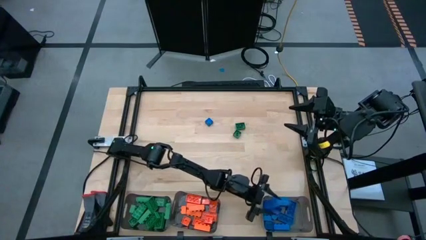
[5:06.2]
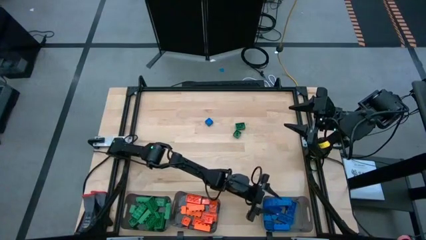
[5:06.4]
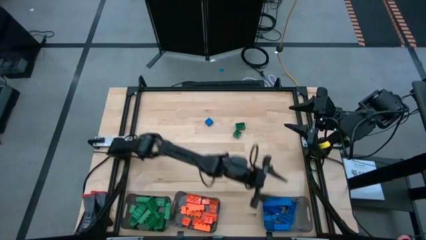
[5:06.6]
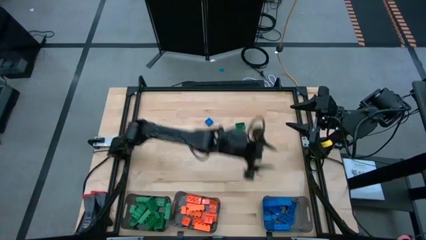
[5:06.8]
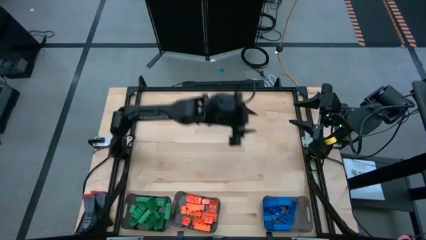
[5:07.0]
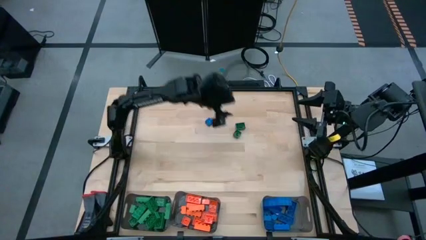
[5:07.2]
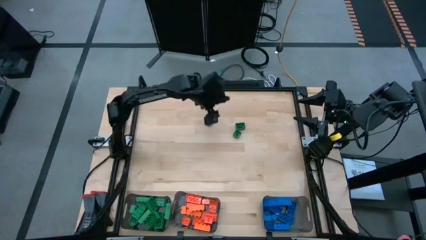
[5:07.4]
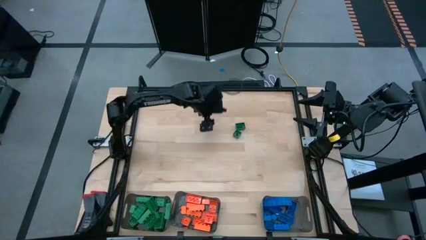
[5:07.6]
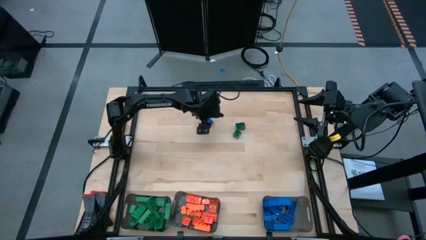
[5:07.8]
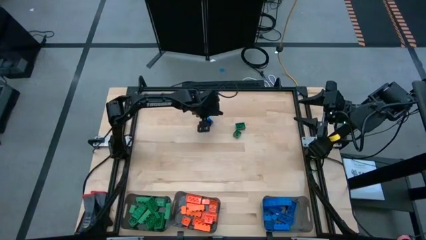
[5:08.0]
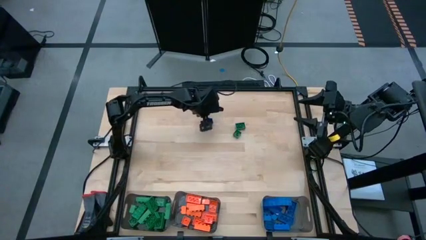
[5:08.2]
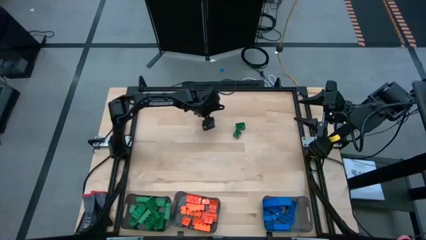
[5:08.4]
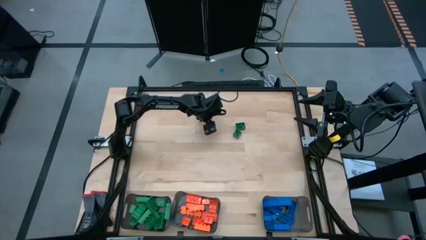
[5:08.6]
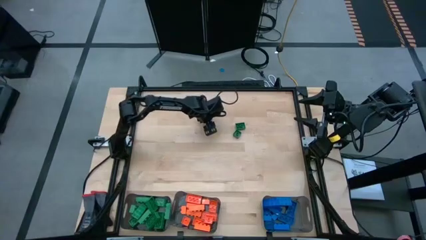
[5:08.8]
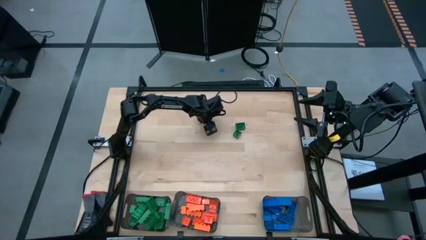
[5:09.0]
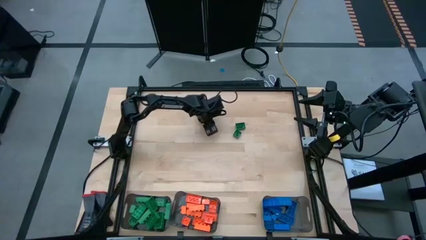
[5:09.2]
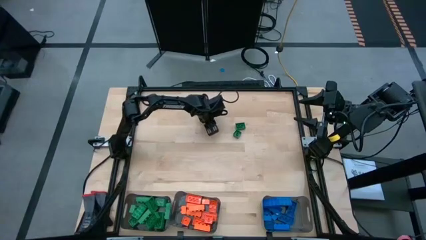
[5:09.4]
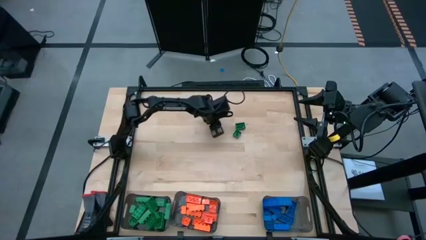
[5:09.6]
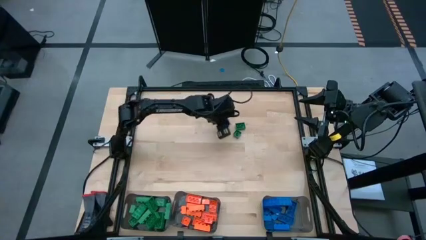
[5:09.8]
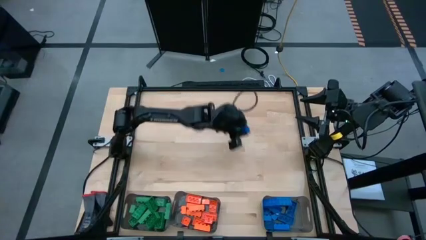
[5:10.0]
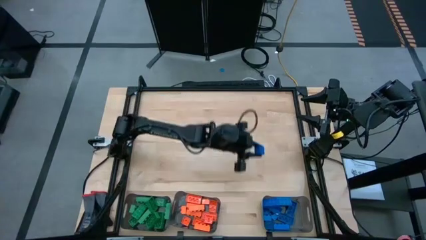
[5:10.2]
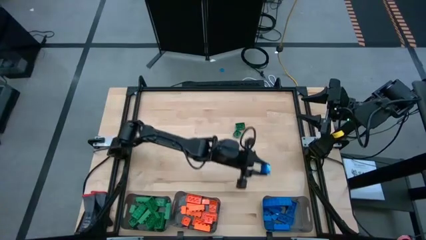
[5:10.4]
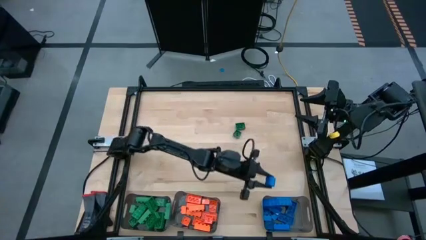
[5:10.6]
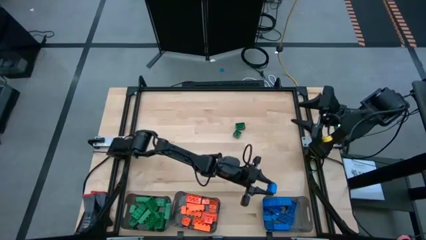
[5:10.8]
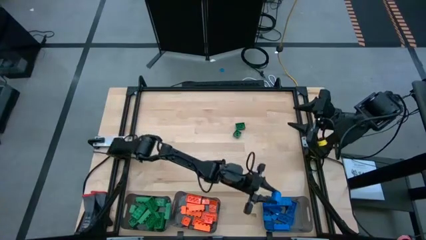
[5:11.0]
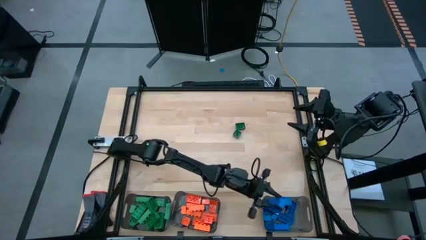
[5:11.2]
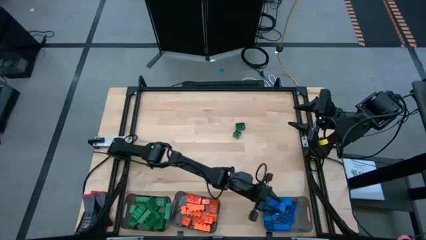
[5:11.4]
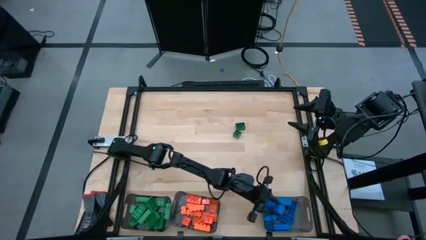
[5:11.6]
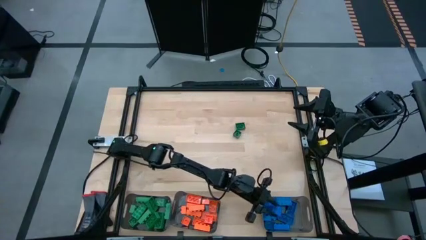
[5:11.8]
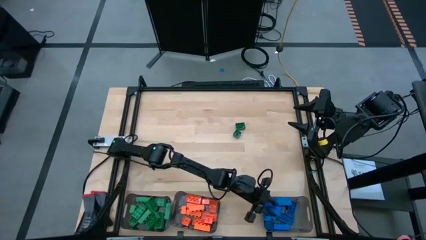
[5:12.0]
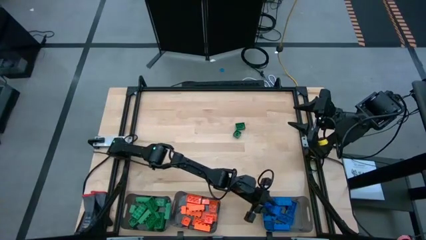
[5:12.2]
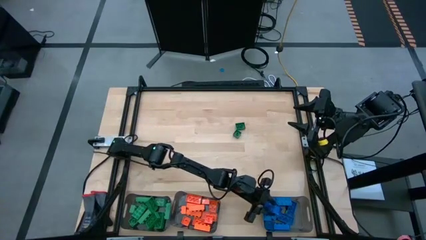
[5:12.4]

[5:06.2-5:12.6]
Task: Sort blocks
Put the blue game piece into the right black bin

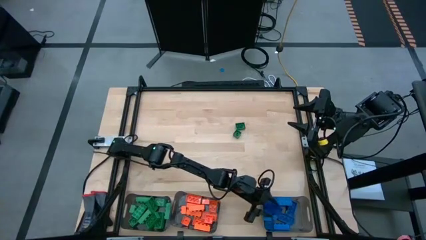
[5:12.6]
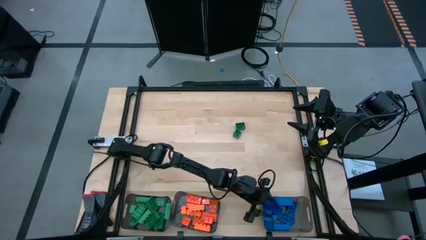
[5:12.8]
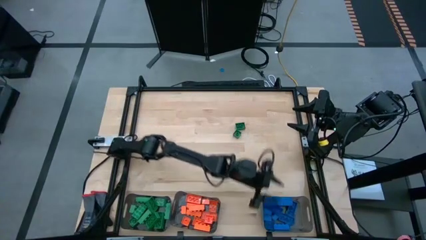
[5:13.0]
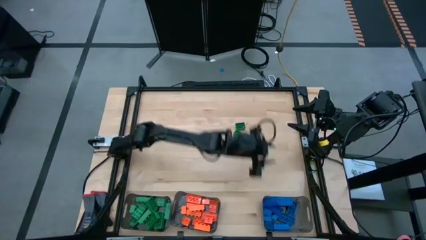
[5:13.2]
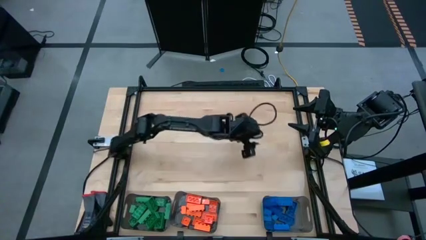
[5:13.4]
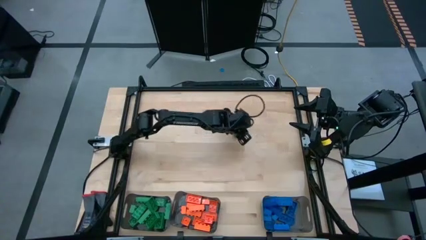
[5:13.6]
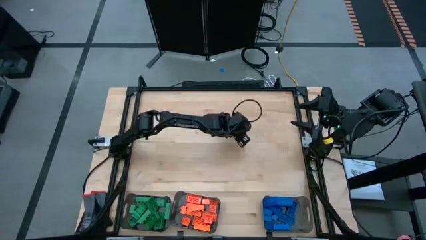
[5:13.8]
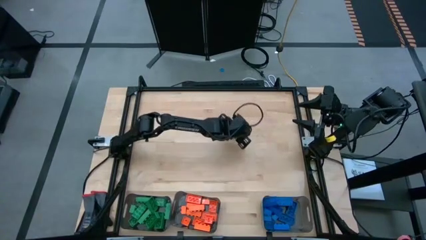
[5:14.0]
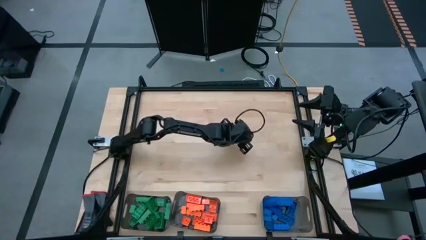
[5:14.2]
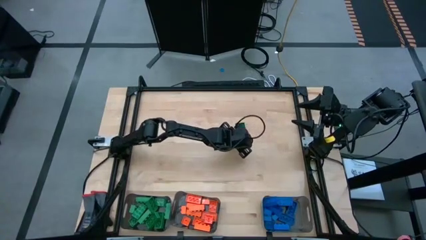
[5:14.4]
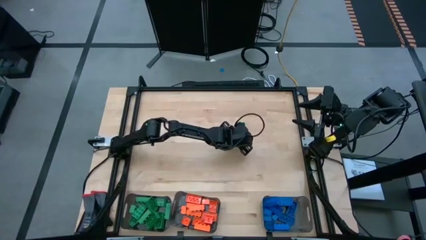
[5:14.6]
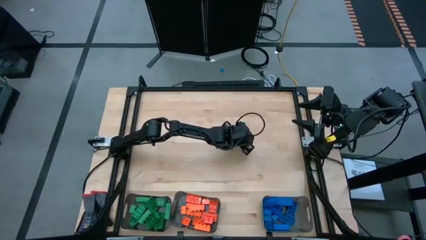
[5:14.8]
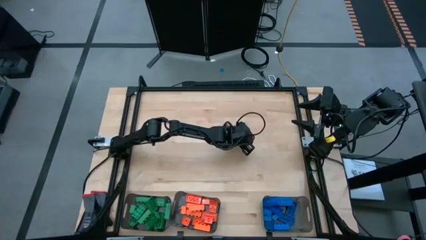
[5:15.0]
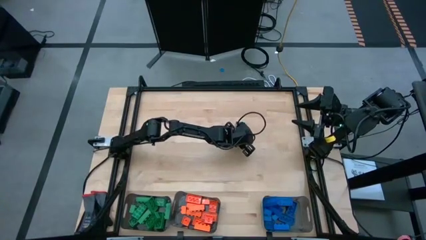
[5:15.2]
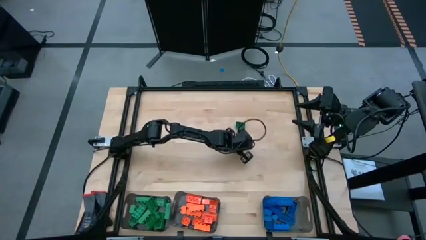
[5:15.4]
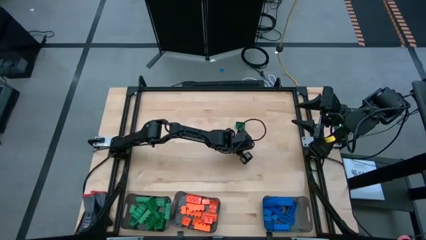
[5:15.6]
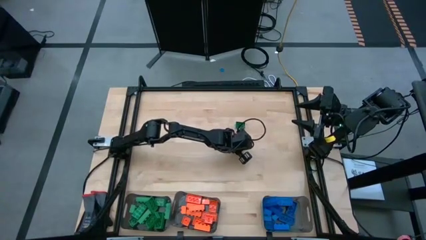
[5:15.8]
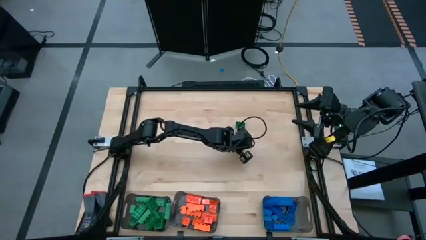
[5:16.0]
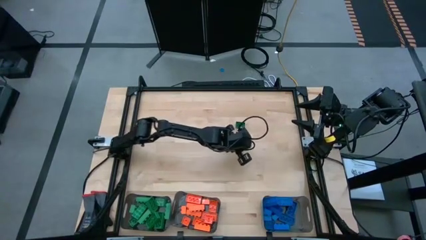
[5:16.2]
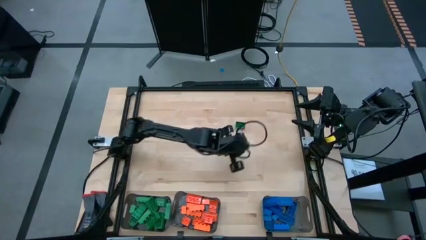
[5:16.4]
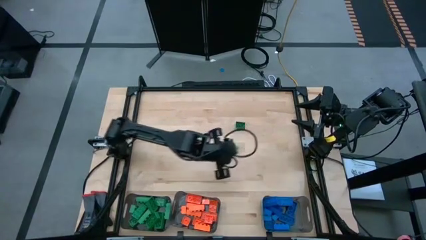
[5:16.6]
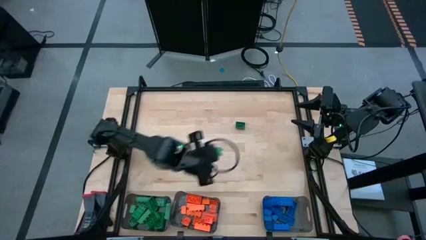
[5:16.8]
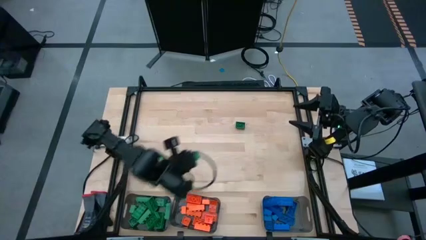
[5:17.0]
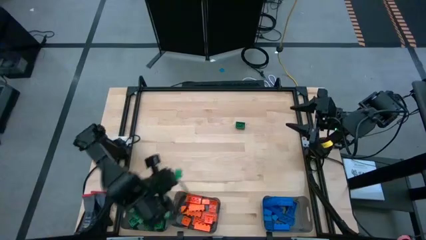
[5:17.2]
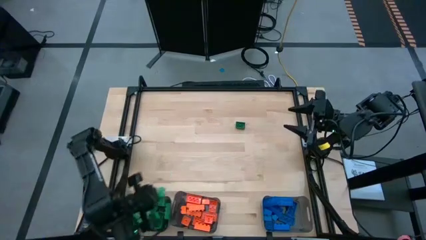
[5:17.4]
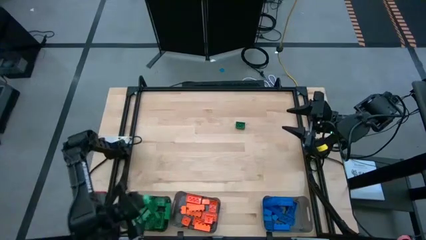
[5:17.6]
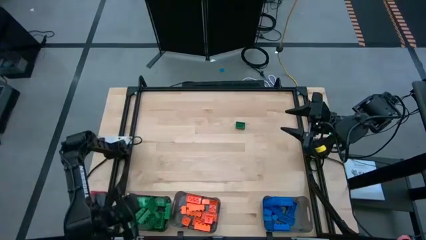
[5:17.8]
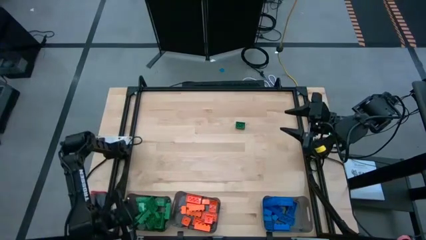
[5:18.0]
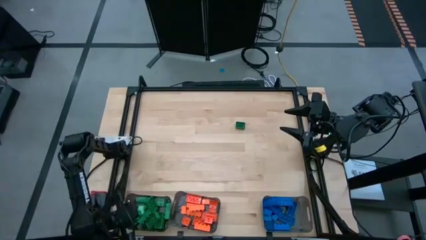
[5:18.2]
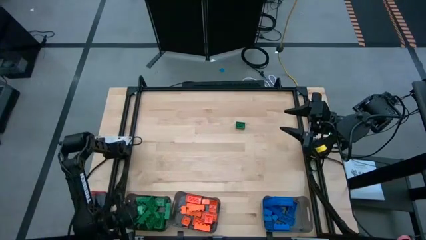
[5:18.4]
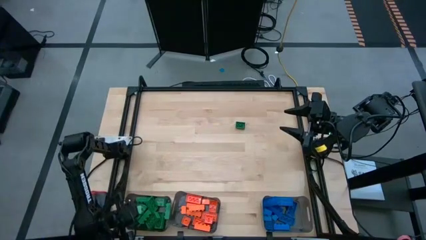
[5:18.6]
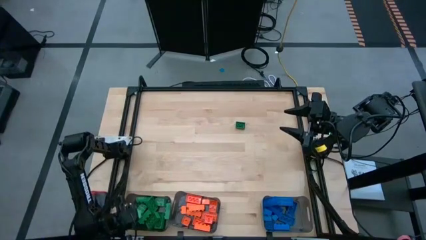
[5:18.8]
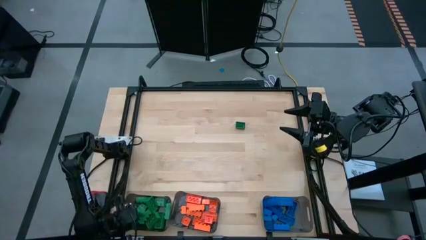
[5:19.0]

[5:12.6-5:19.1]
Put the green game piece into the left black bin
